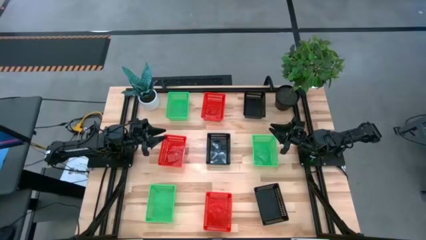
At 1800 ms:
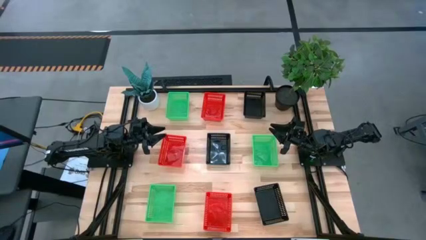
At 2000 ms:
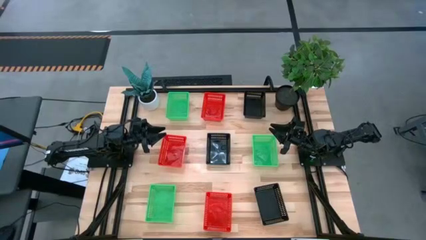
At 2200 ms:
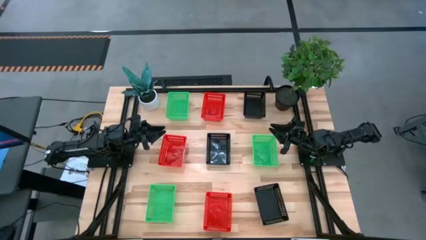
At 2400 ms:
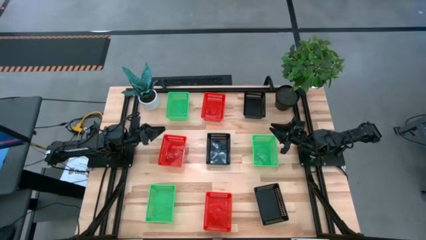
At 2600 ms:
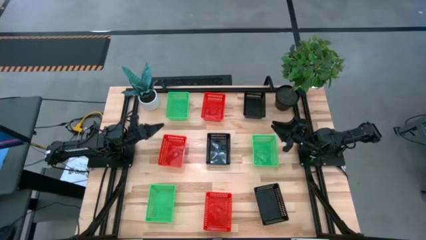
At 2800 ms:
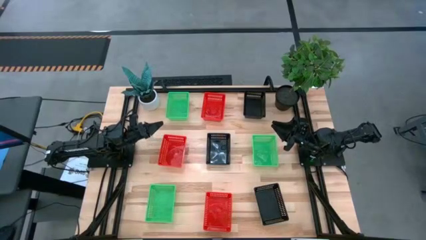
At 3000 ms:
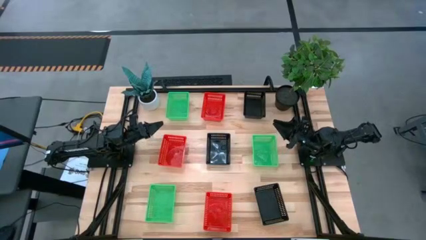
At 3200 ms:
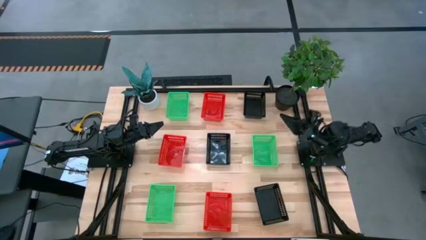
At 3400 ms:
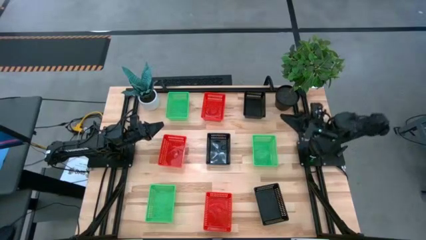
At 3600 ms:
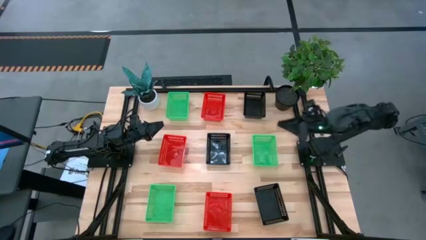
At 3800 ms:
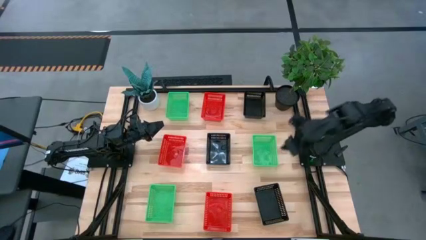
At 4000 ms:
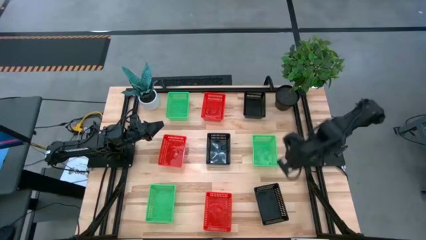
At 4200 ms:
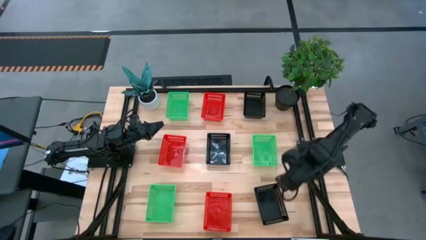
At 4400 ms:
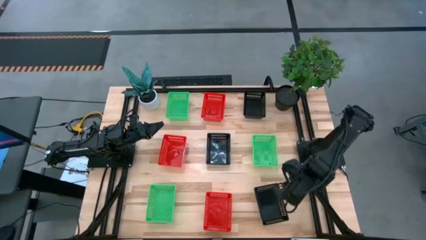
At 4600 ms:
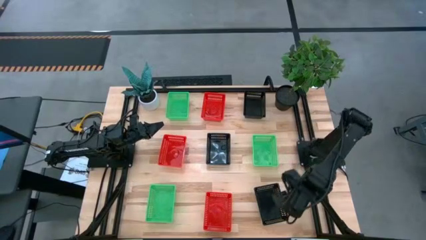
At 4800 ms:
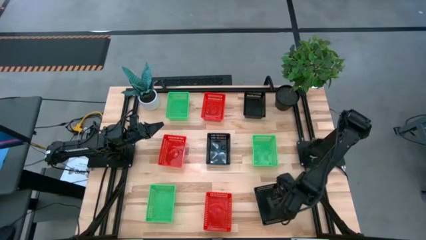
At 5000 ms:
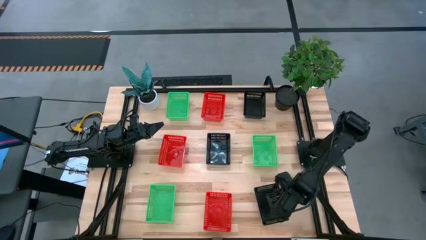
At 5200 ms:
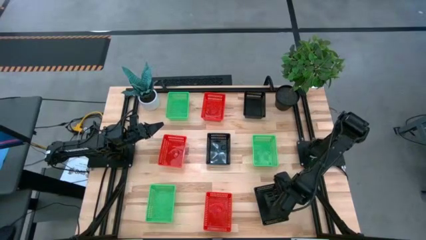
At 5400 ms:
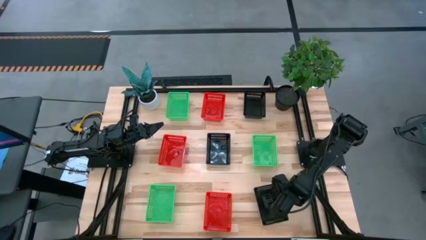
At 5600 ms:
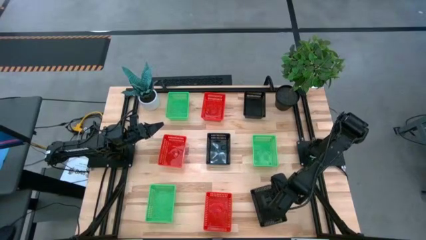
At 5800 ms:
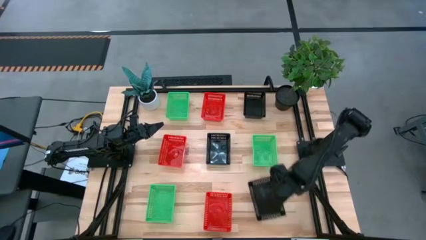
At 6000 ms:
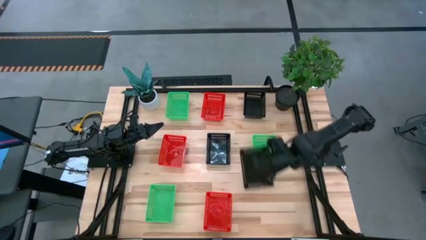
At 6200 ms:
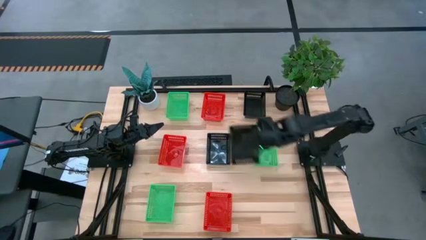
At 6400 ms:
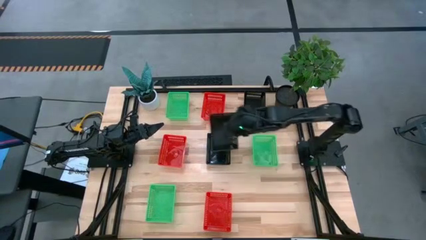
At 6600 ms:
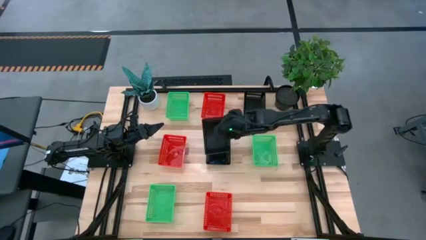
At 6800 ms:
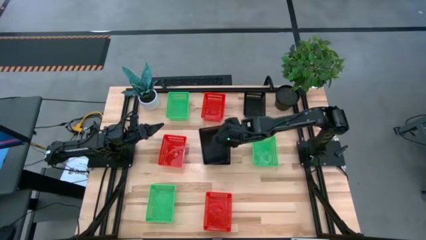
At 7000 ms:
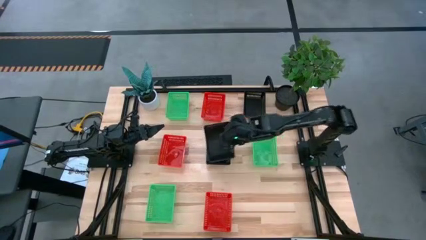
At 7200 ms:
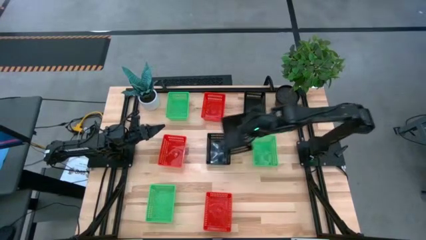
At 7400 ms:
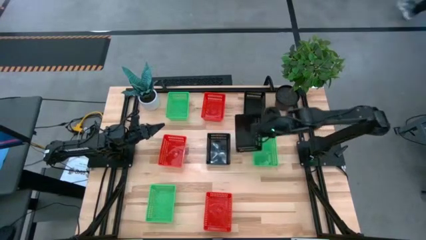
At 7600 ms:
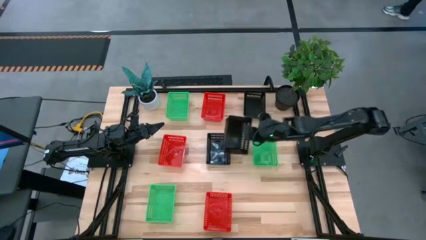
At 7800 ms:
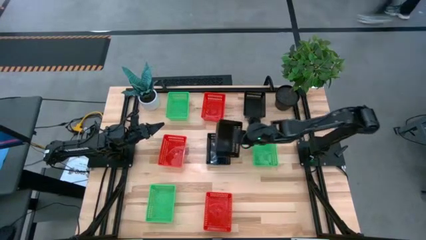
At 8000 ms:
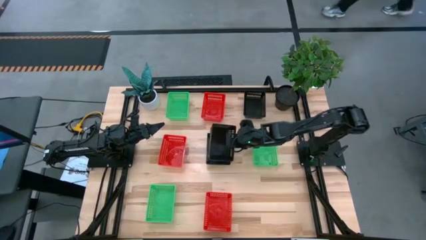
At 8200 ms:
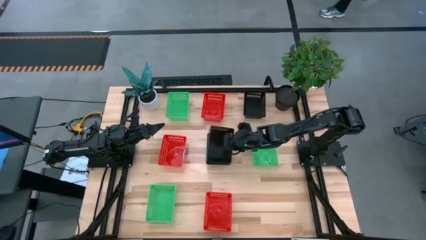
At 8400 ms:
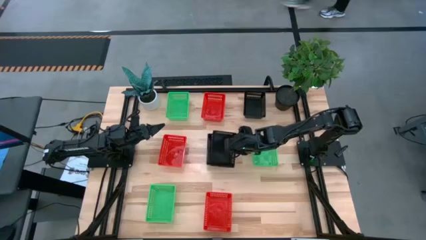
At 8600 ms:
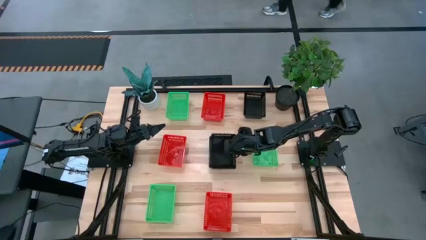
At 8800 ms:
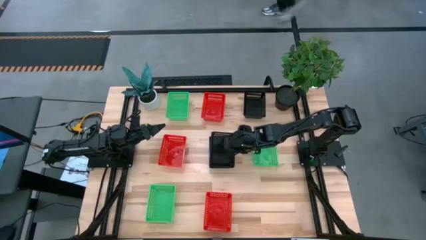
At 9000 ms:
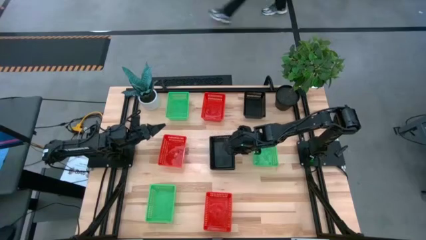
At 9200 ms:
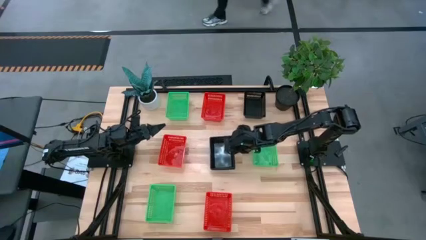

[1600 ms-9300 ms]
Stack the bottom black basket on the middle black basket

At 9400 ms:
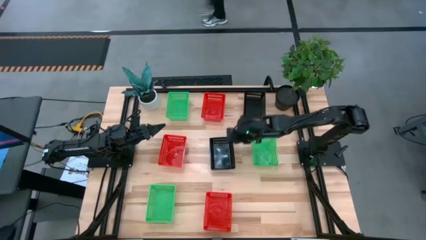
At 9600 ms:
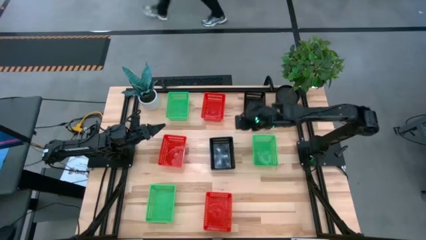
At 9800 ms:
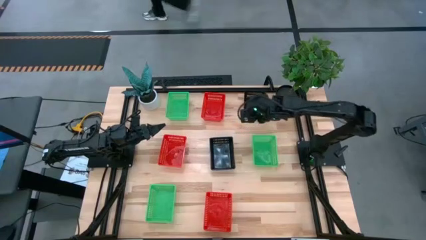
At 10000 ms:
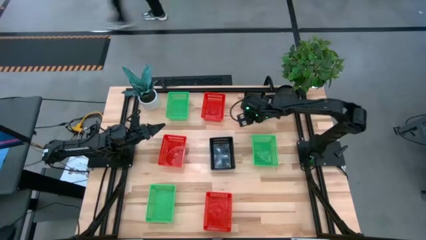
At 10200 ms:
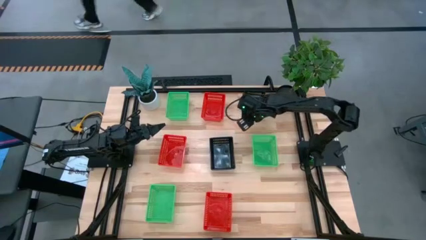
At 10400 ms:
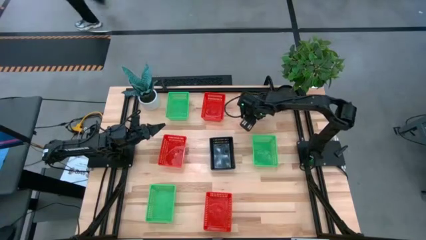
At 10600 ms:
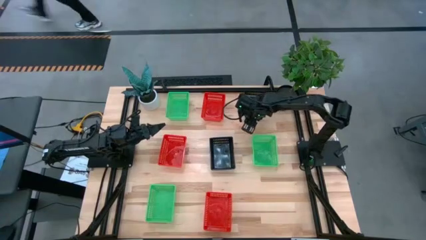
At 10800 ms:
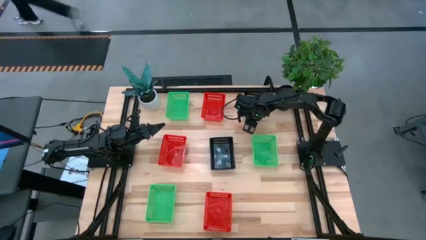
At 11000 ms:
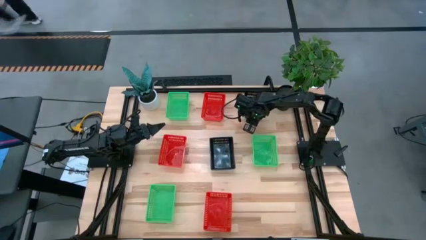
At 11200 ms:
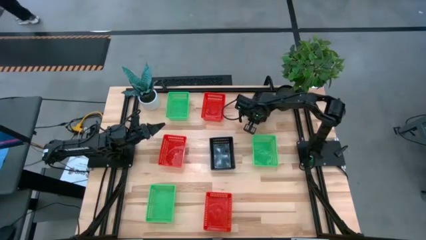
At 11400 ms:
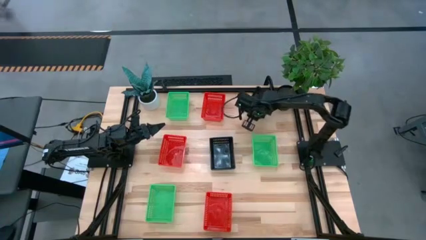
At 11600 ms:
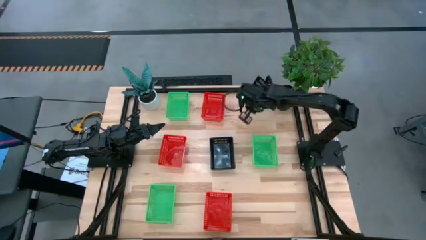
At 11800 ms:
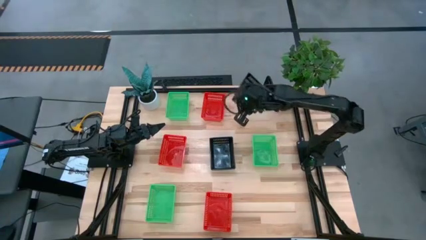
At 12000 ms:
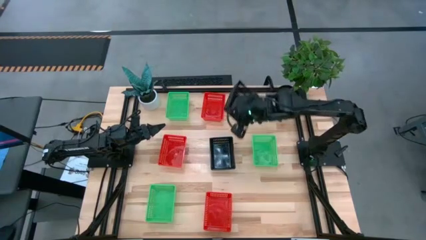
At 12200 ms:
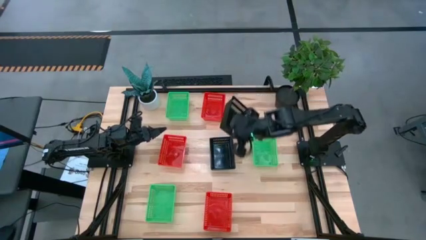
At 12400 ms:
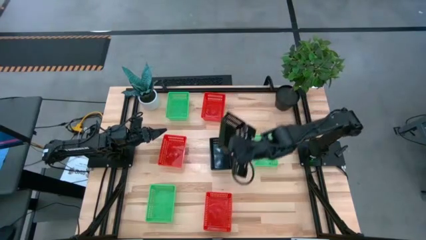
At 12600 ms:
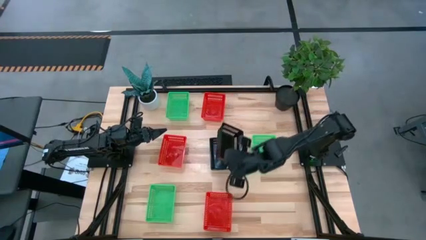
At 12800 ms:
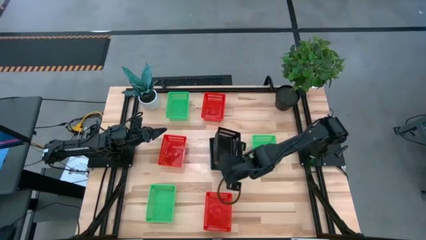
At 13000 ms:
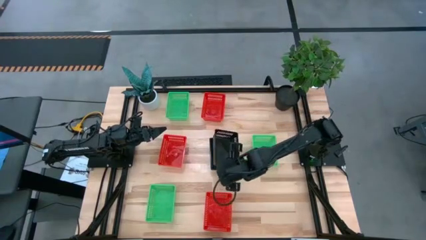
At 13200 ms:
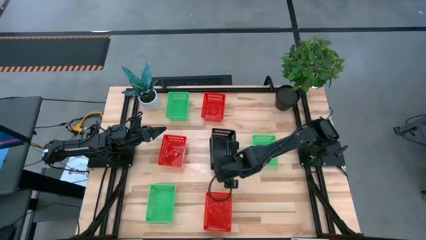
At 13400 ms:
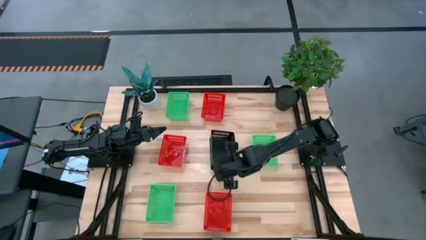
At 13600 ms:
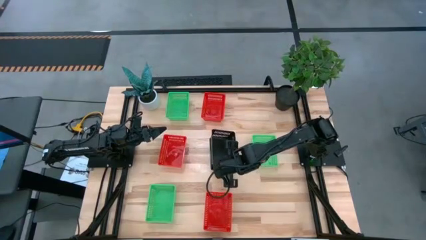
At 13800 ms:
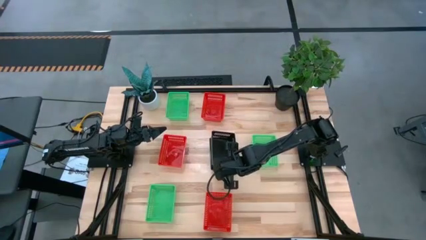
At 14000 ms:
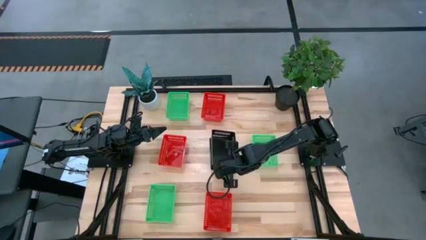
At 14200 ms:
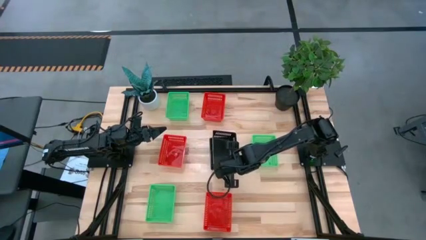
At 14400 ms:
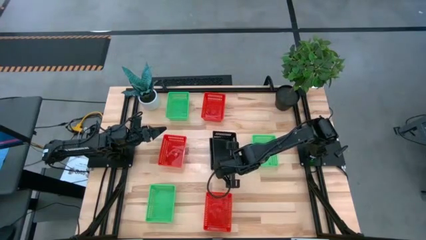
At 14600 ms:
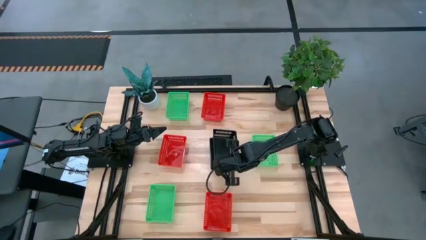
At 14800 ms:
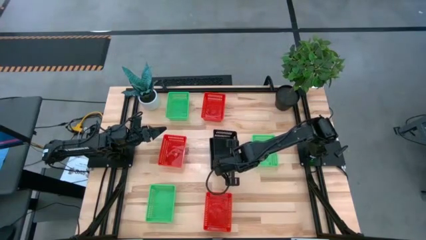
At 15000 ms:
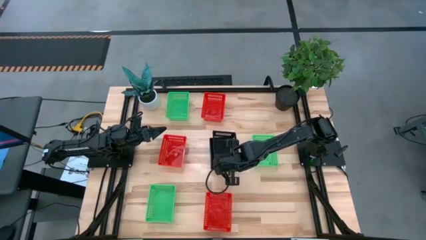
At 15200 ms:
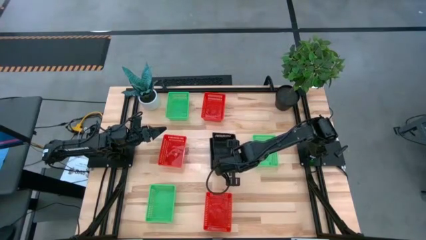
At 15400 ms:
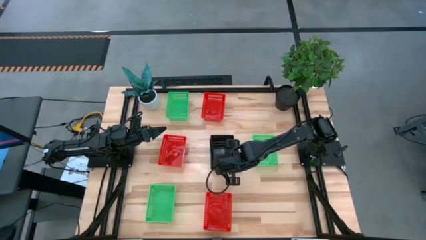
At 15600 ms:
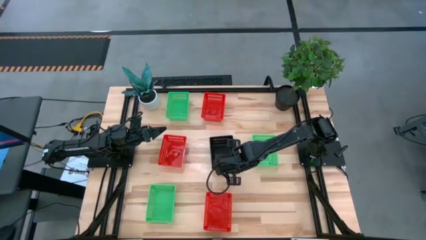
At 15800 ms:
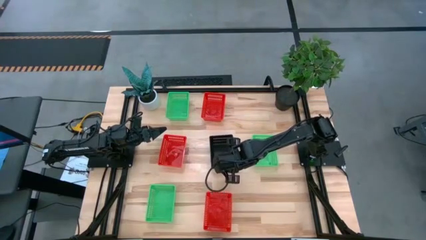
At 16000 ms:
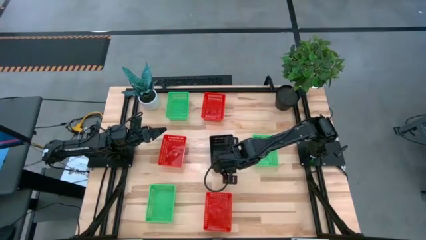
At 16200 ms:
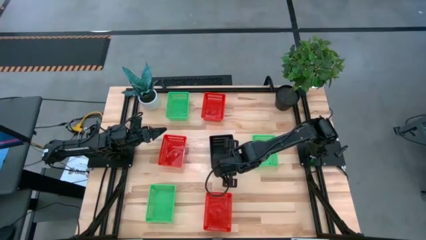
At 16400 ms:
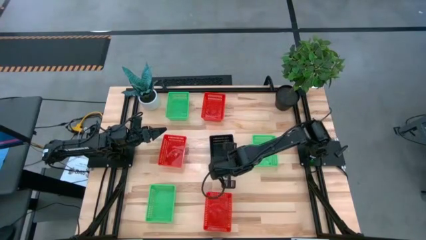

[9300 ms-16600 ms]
Stack the top black basket on the black baskets
